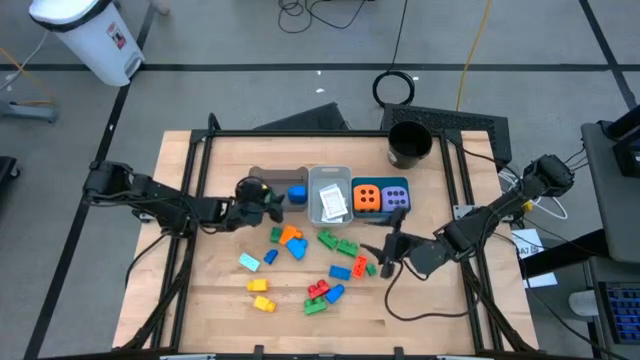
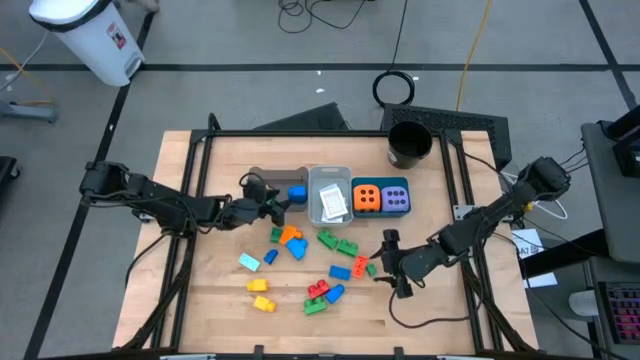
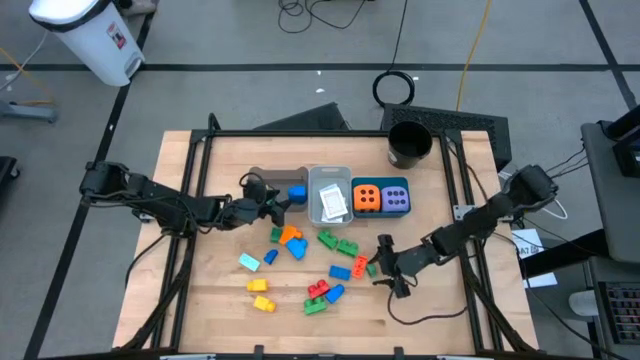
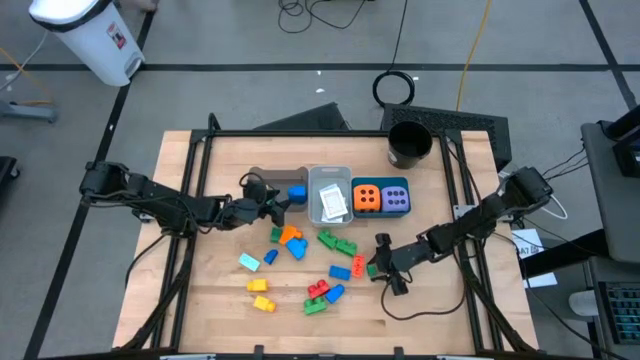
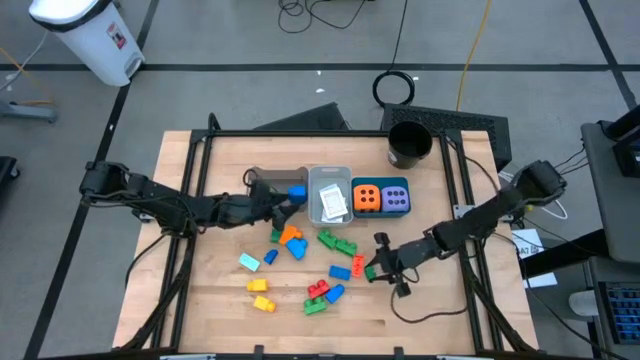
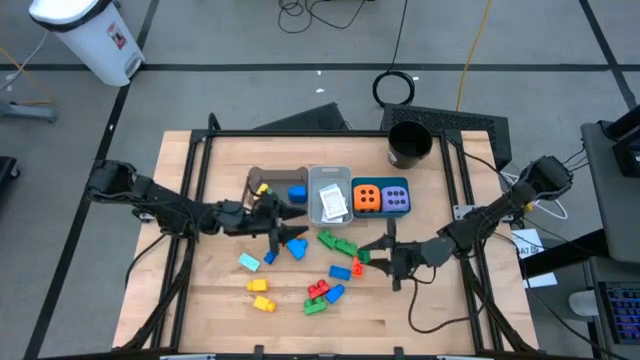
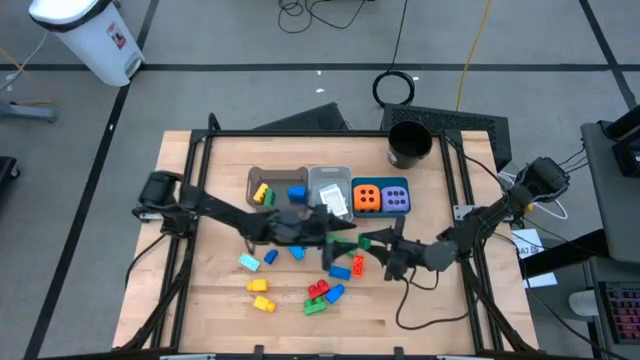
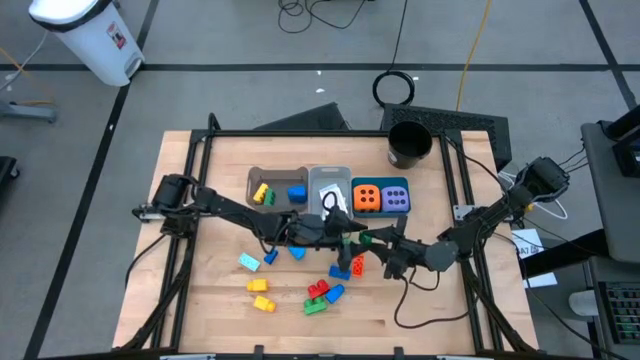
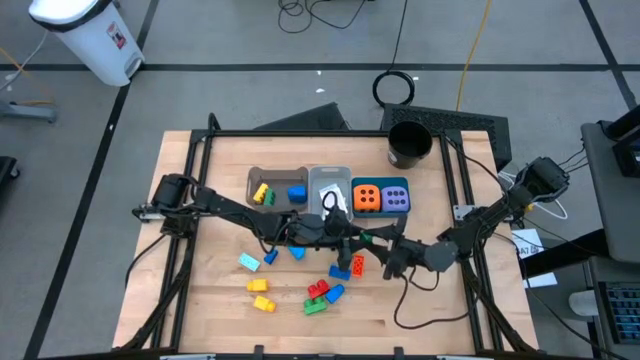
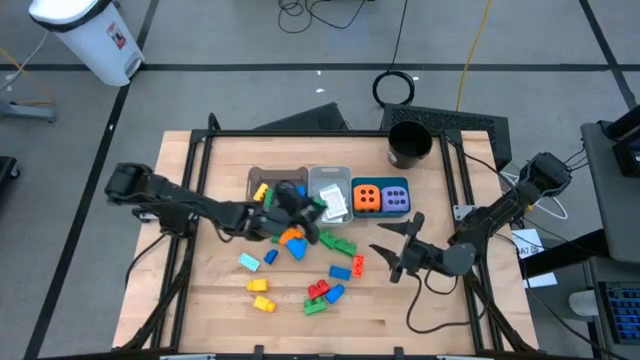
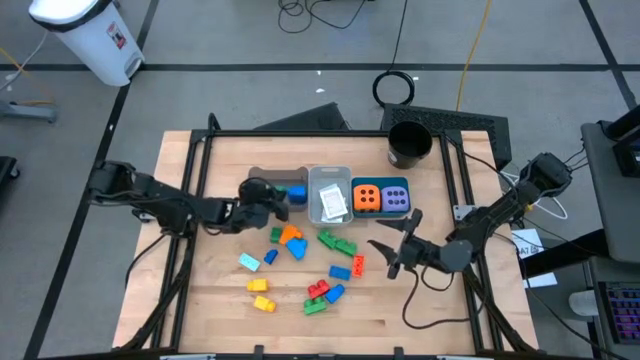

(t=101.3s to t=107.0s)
Task: Pick & Place Toys
Put the green game piece into the black bin

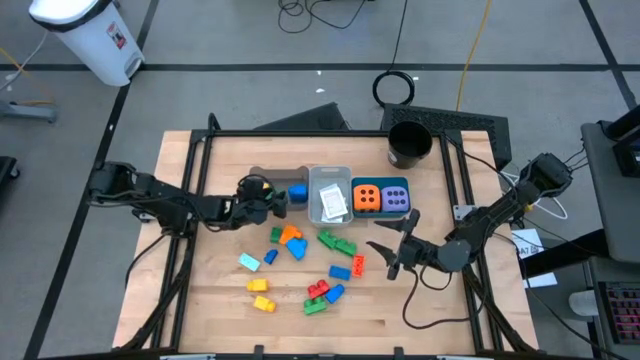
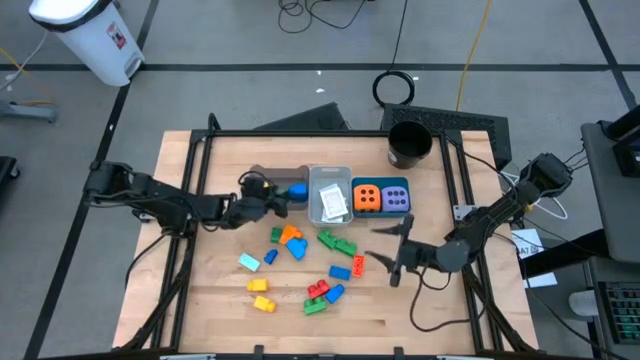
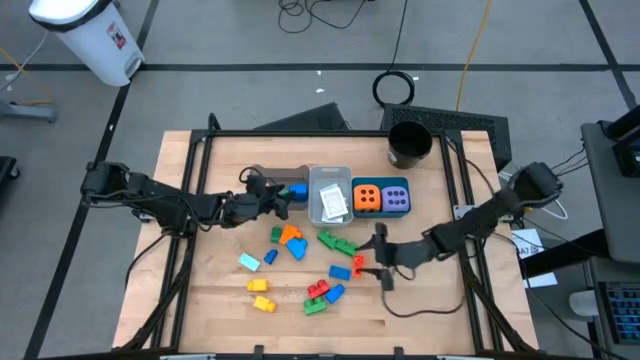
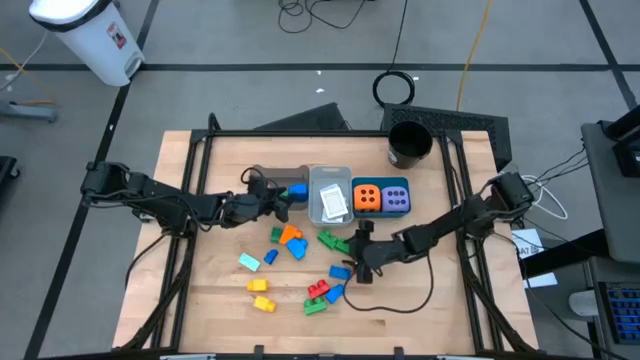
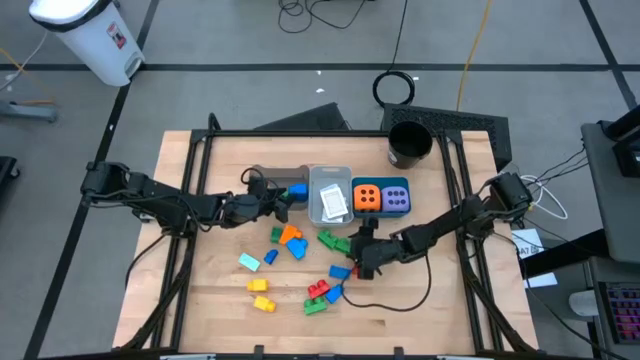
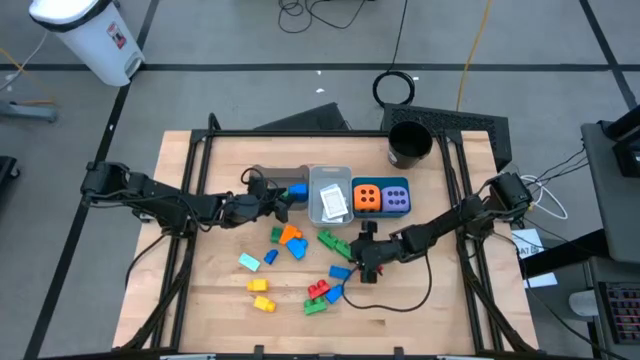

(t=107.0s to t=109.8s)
Put the green game piece into the black bin

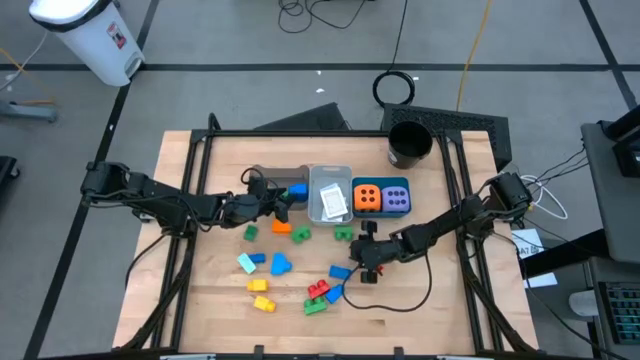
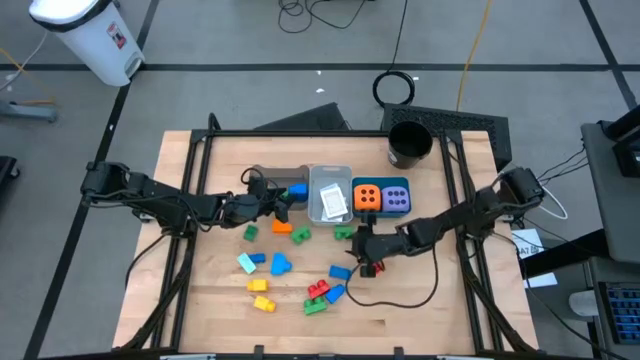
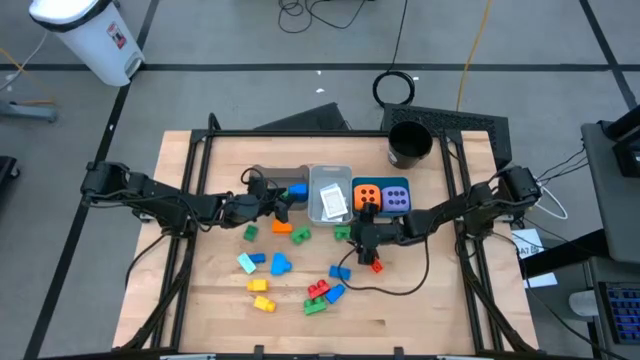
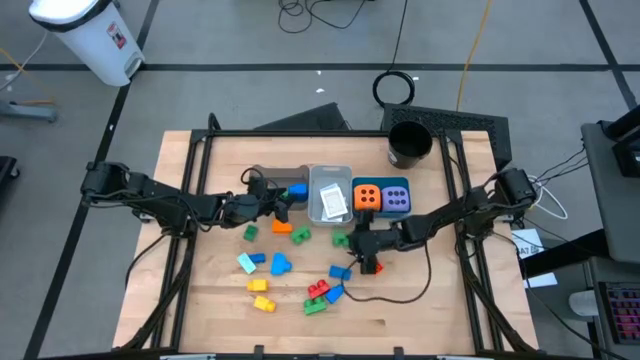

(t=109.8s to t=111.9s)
Move the green game piece to the center of the table

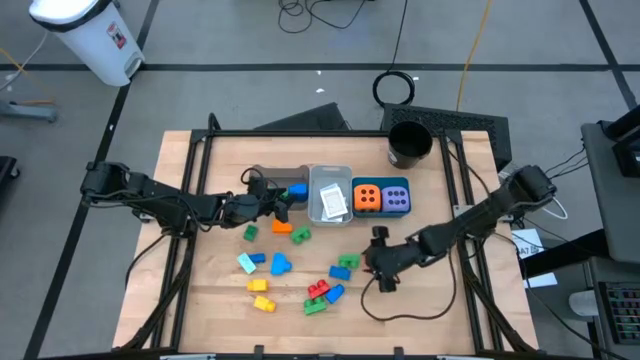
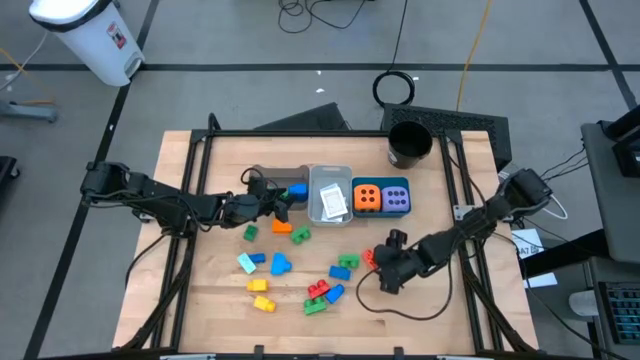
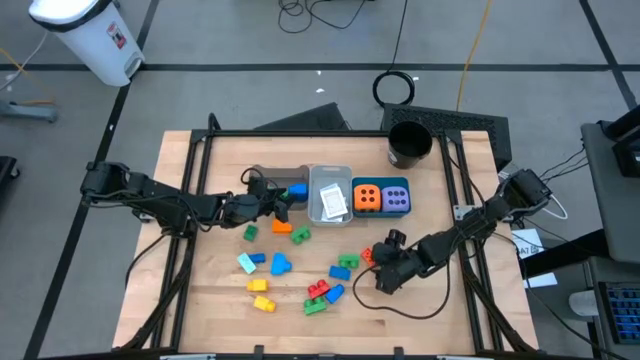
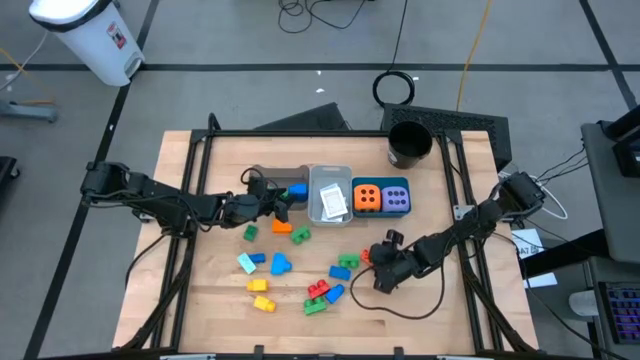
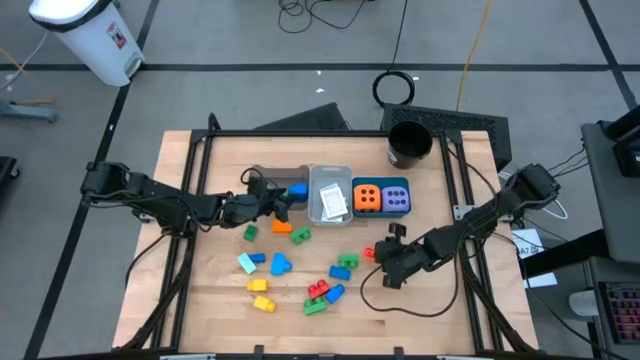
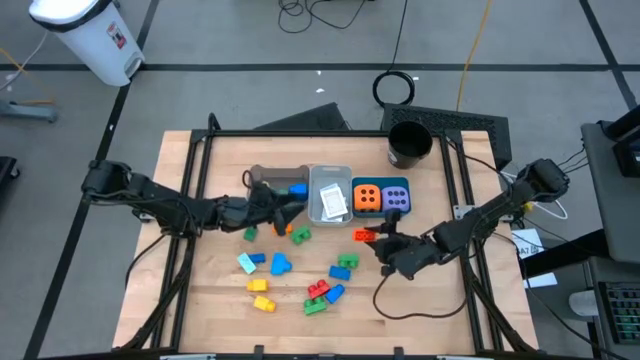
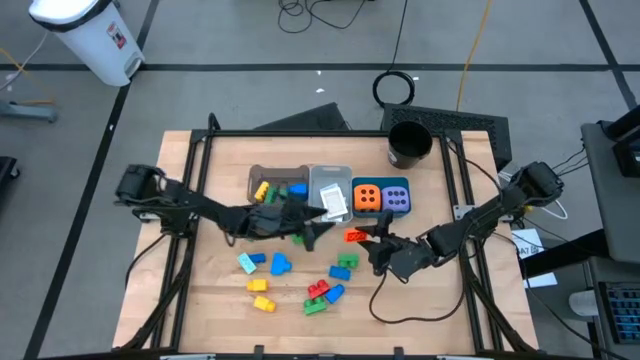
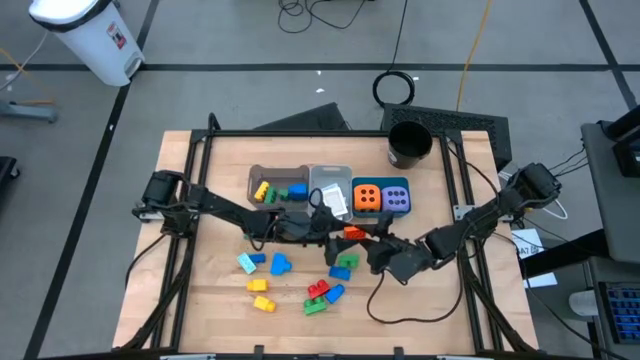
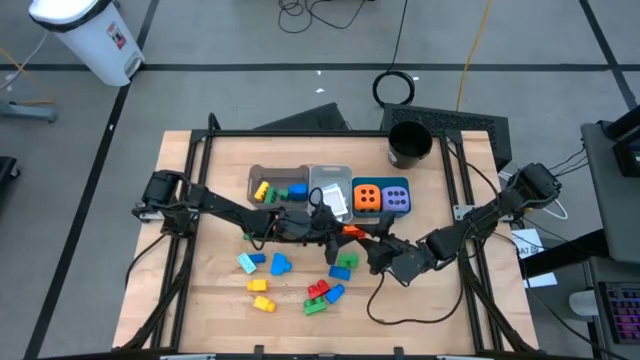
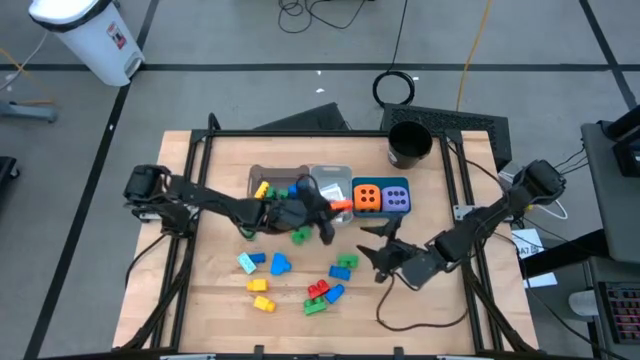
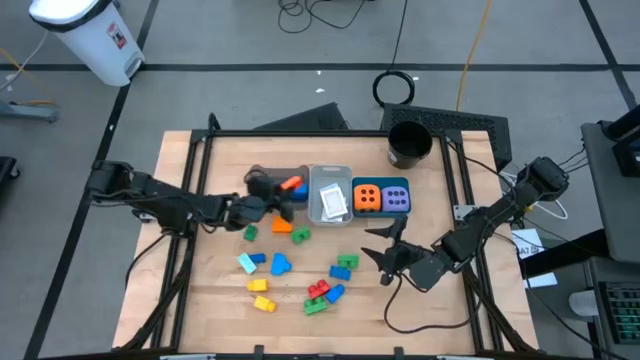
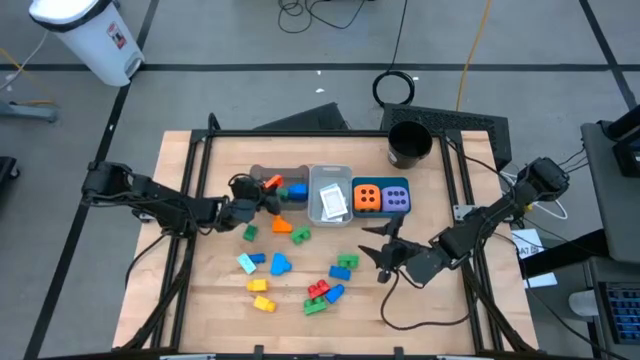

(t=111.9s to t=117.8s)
Put the orange game piece into the black bin

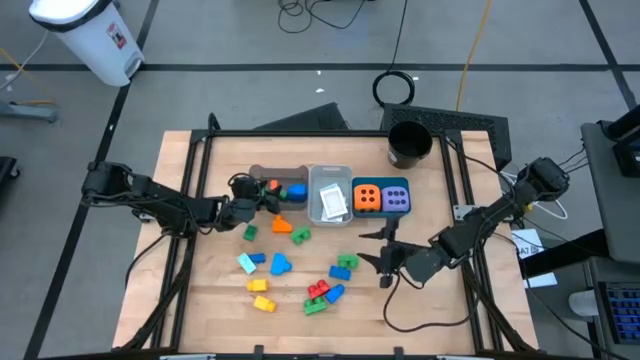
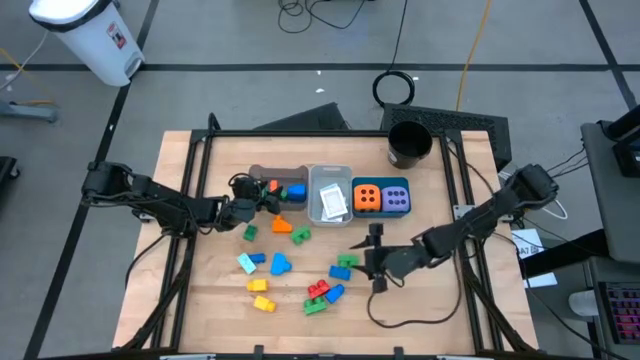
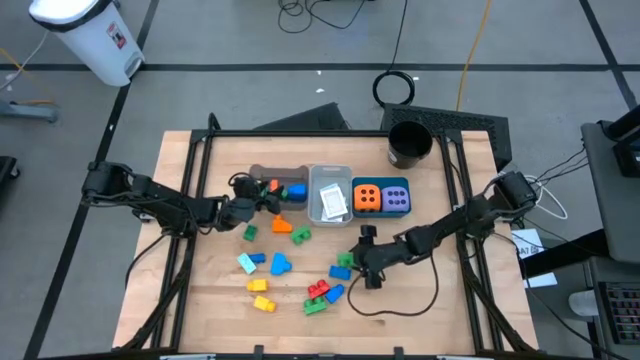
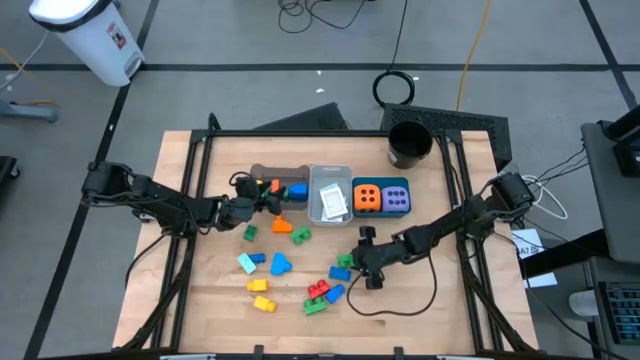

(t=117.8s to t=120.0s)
Put the green game piece into the black bin

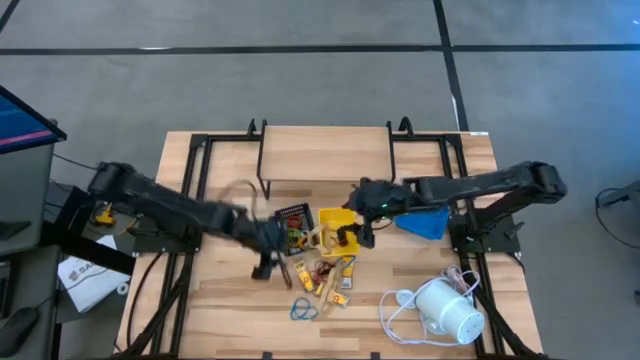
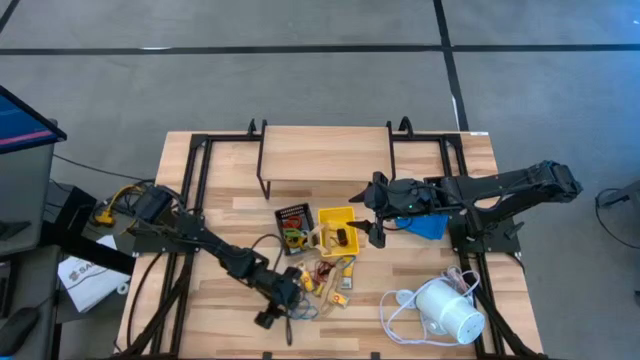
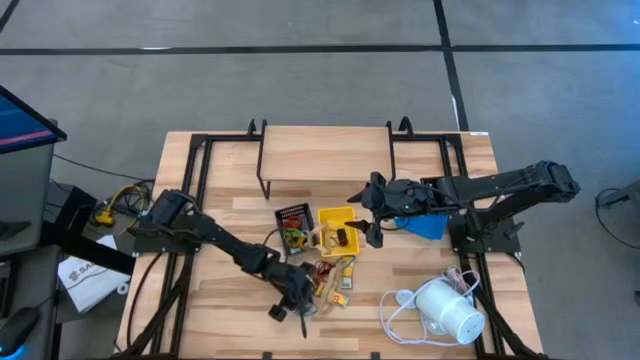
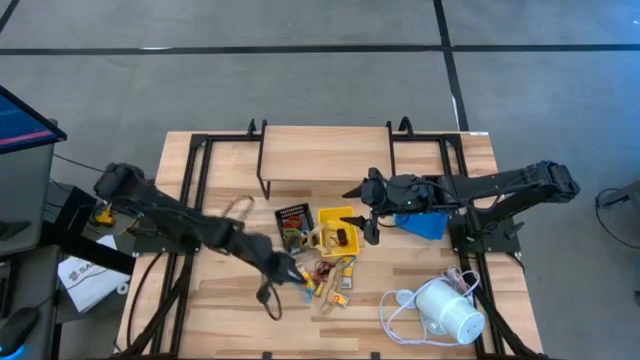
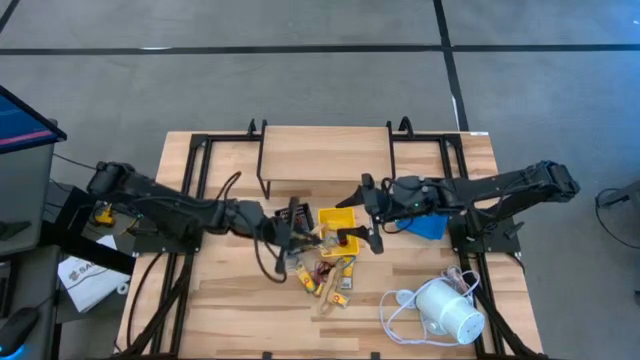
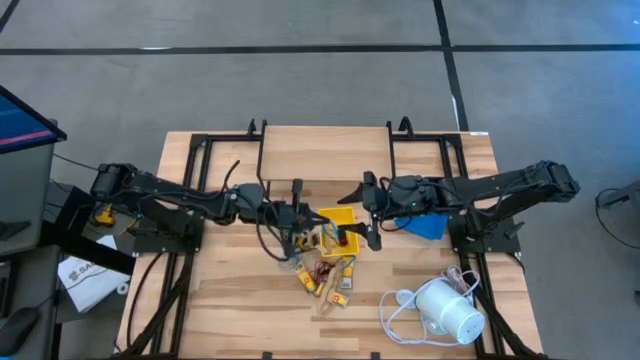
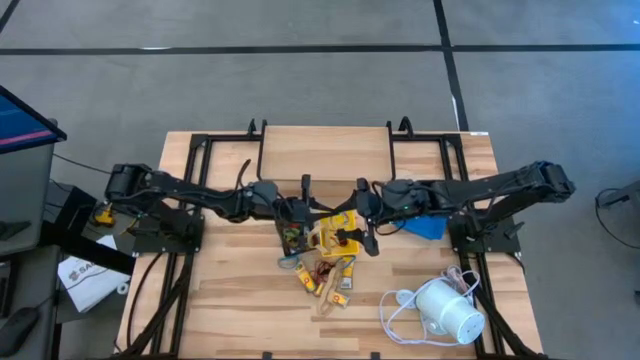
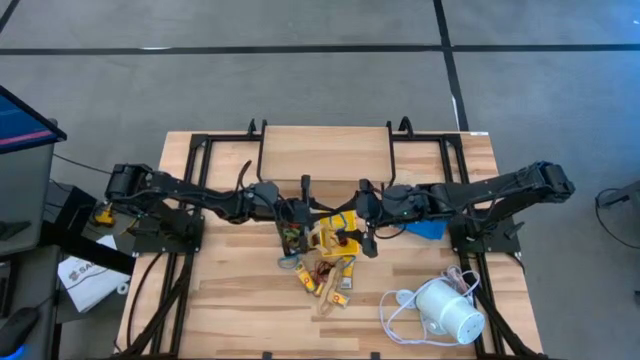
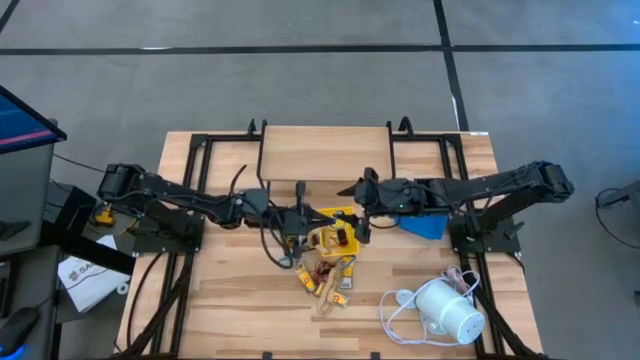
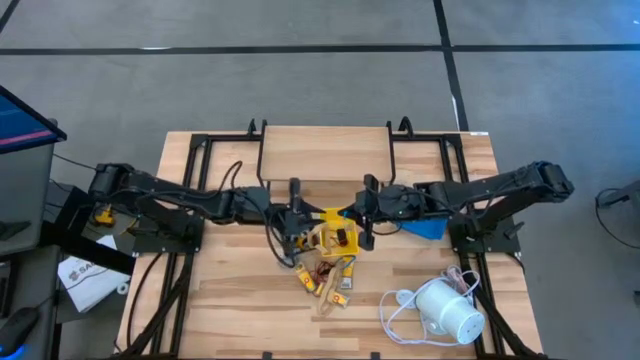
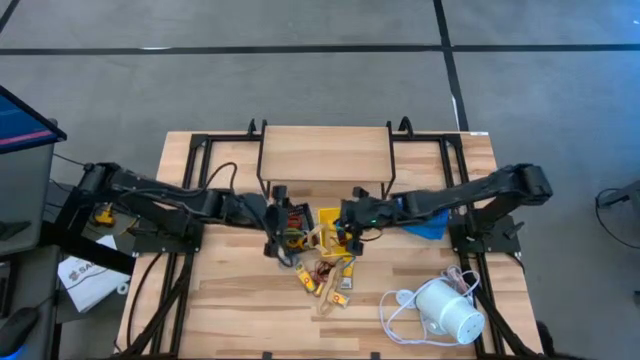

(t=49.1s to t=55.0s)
Task: Pick & Place Office Desk Supplies
Put the blue rubber band into the yellow bin
